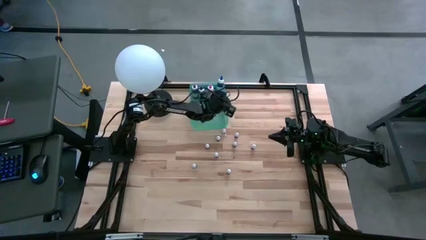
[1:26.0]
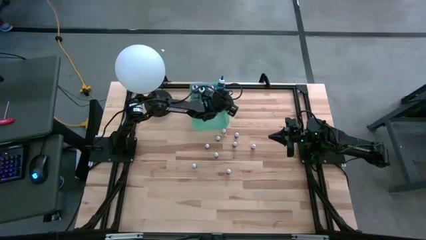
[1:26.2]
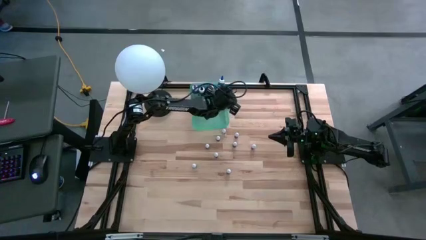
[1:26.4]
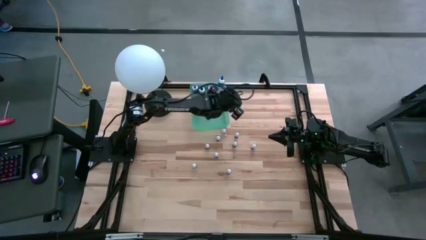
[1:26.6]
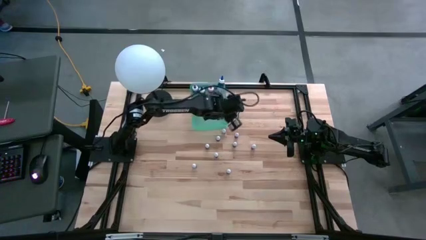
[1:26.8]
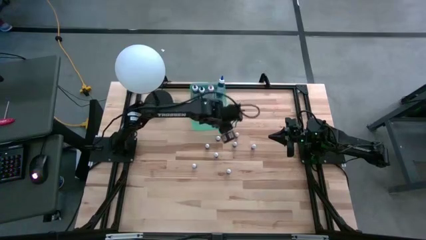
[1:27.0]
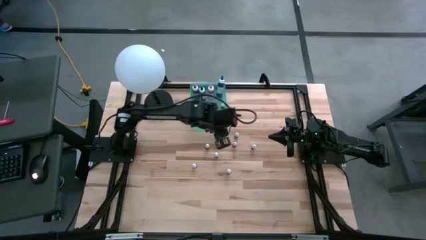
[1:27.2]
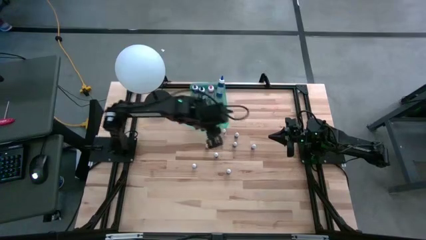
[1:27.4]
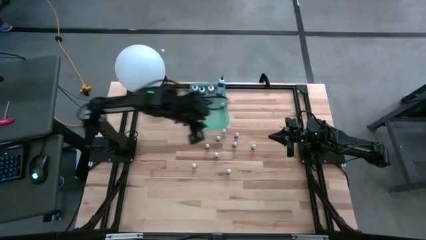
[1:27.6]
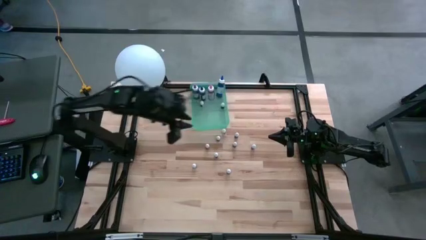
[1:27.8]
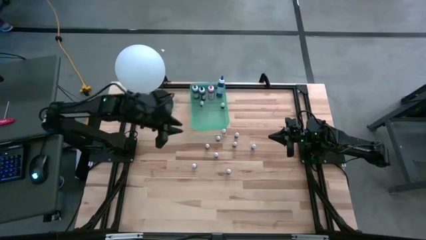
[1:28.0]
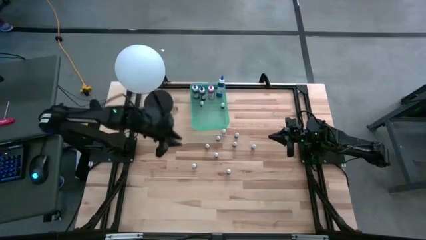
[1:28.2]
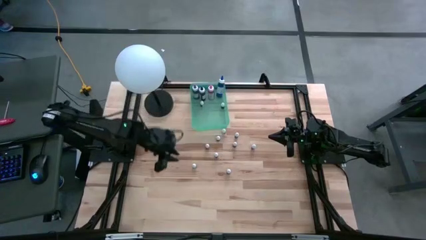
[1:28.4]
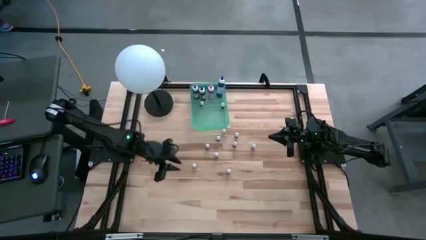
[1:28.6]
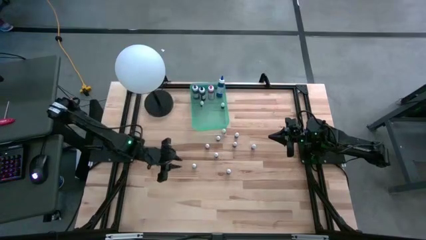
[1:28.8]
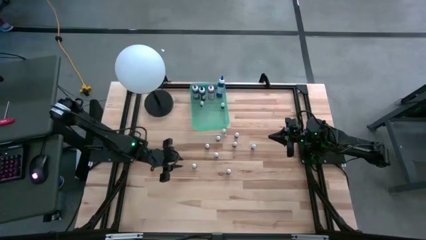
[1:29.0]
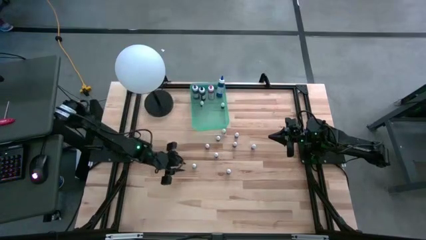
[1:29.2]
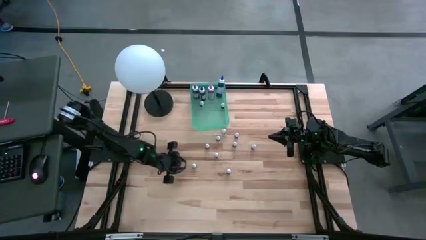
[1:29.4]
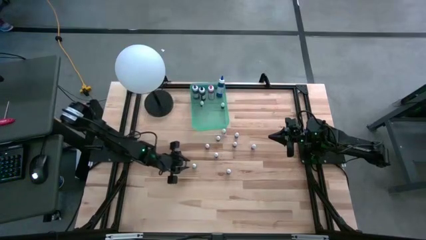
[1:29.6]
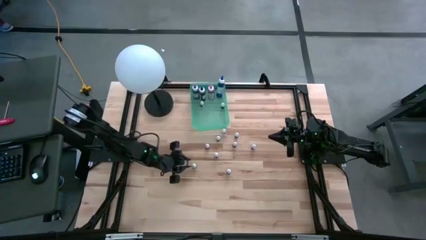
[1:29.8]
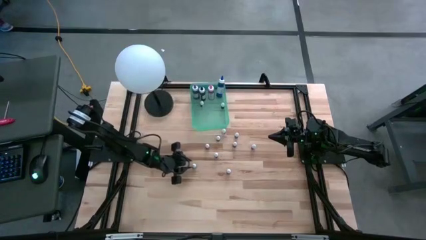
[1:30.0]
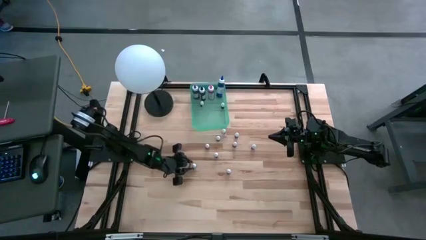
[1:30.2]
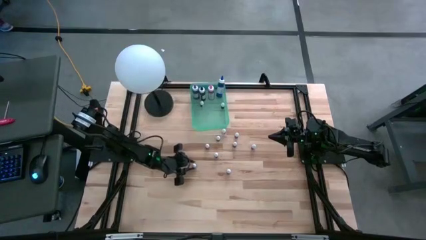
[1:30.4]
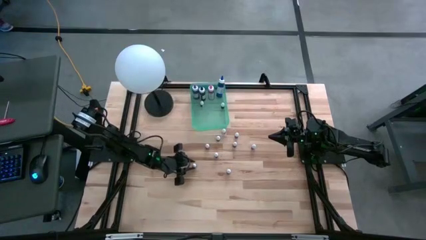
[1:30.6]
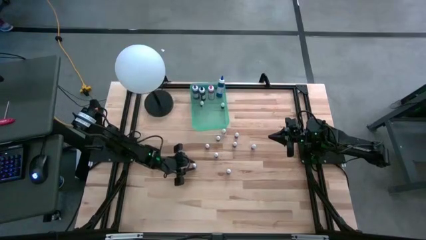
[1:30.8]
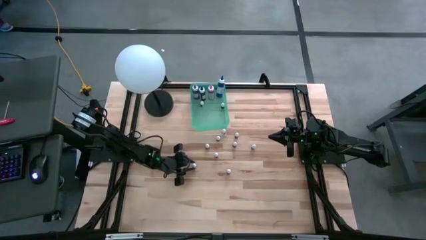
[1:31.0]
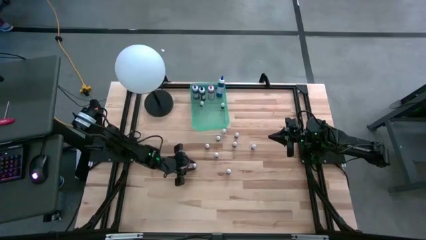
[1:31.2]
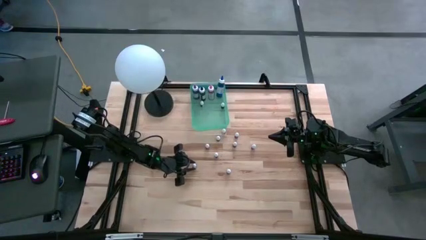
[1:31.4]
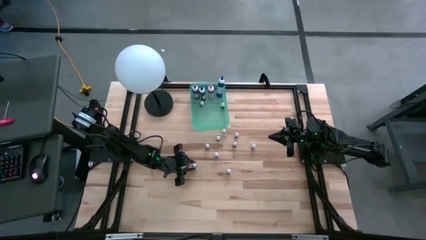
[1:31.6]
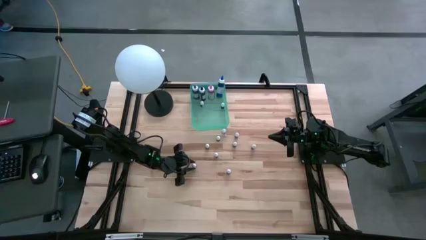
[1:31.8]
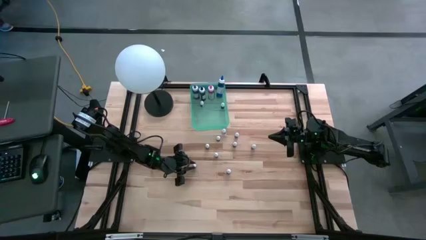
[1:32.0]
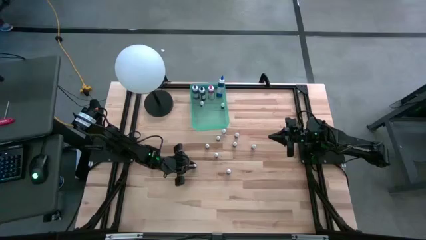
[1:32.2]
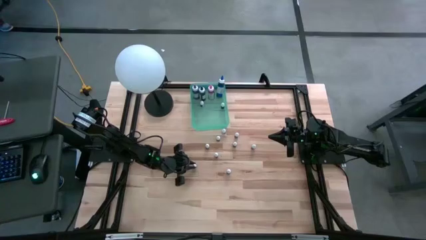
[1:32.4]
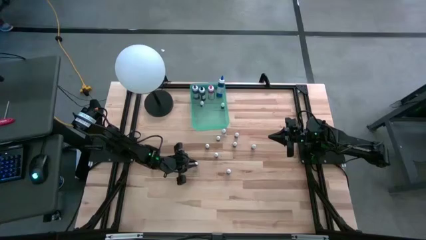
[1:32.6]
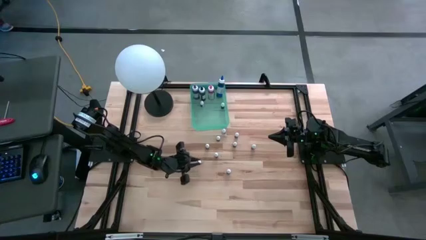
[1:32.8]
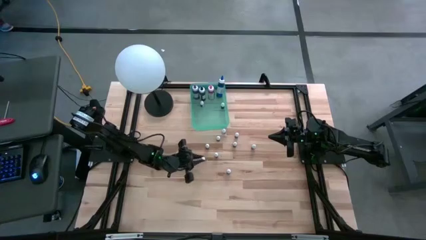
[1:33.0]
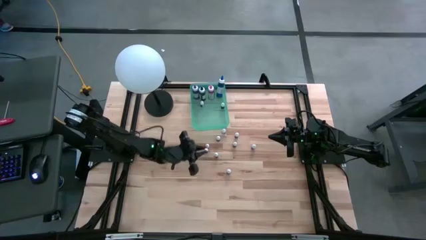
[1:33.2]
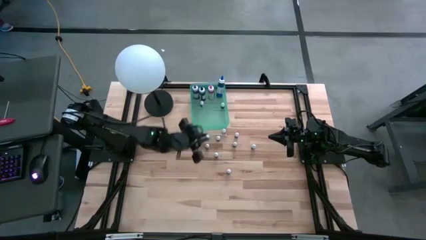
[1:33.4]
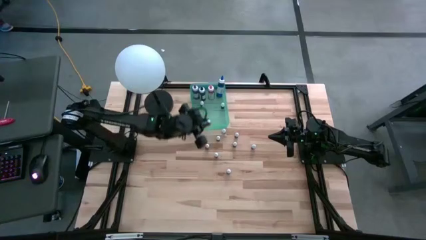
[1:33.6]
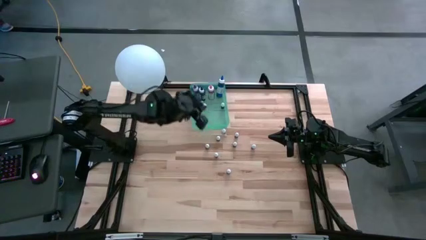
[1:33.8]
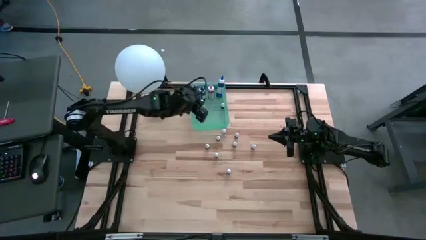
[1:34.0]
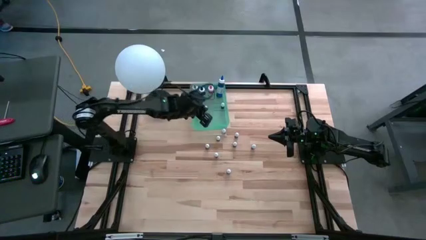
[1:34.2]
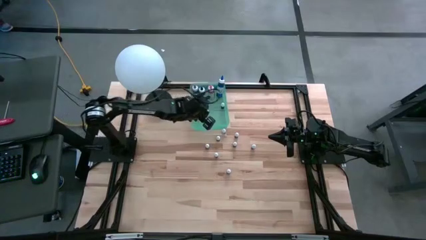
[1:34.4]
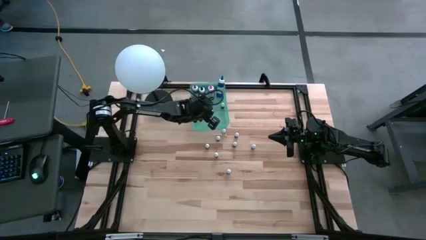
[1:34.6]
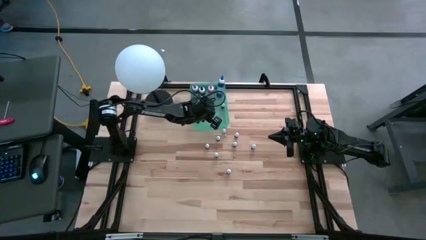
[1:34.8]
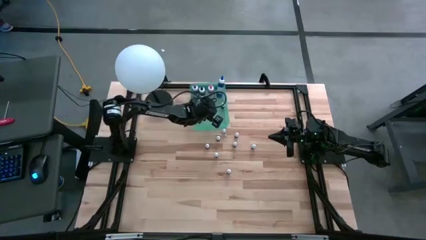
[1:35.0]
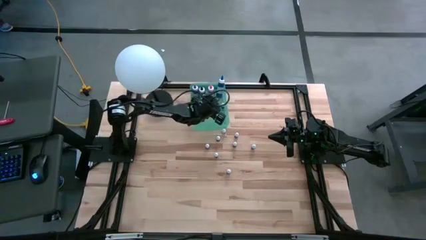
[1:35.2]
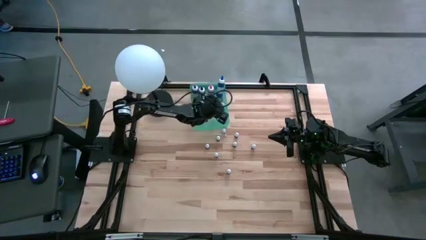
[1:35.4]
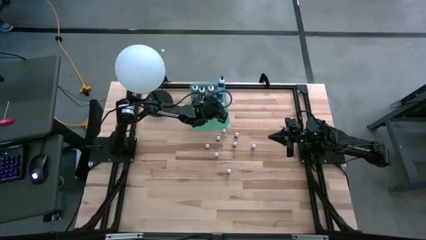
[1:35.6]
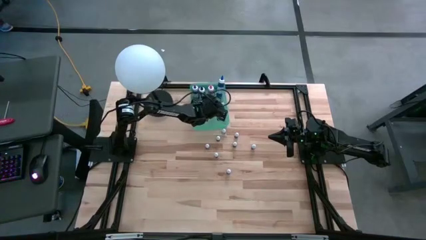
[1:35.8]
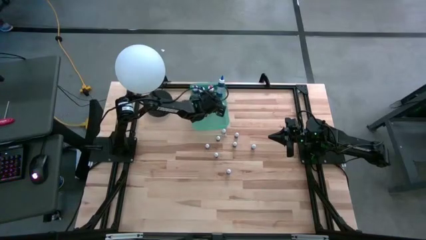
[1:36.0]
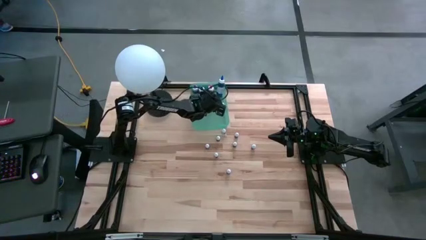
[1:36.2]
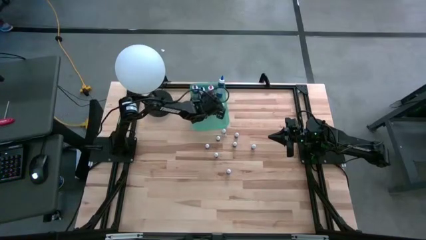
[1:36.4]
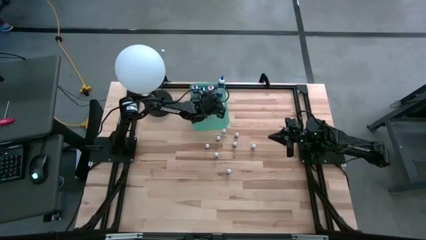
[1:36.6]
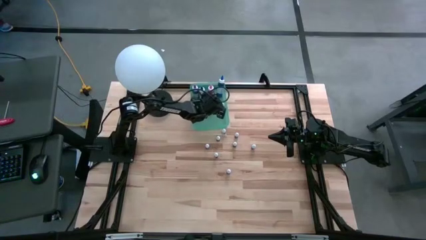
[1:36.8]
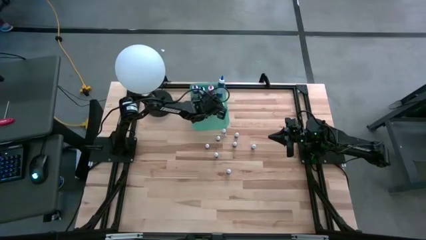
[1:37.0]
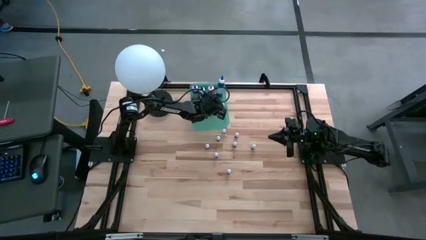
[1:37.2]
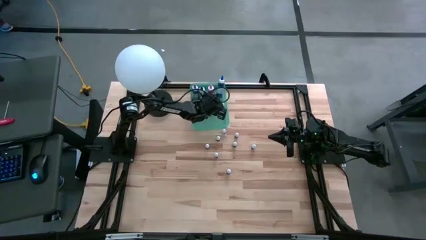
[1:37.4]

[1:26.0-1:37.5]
Task: Pick & Place food coloring
Put the small green food coloring bottle into the blue bin

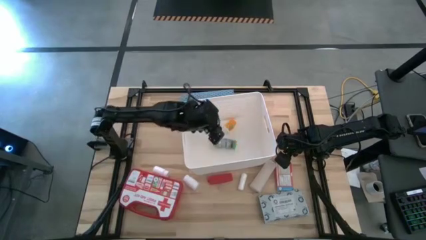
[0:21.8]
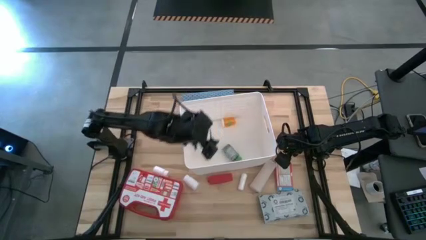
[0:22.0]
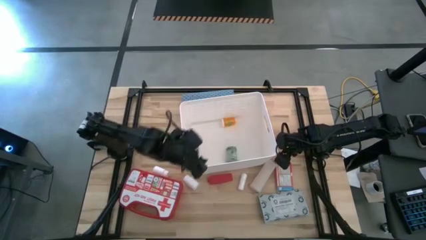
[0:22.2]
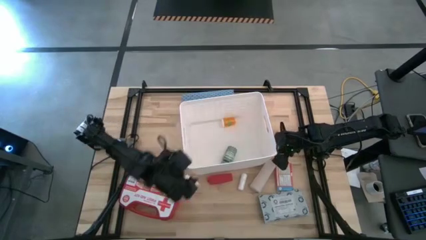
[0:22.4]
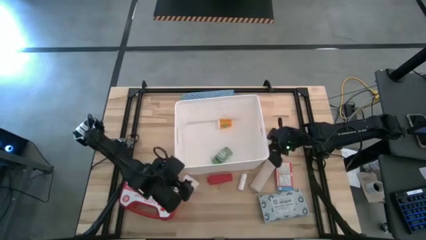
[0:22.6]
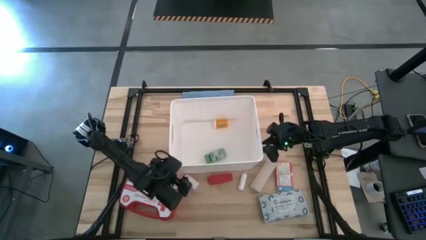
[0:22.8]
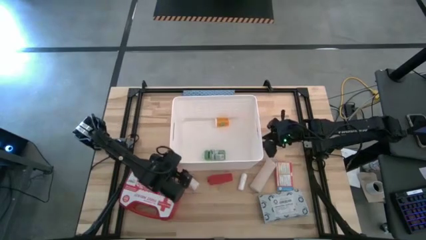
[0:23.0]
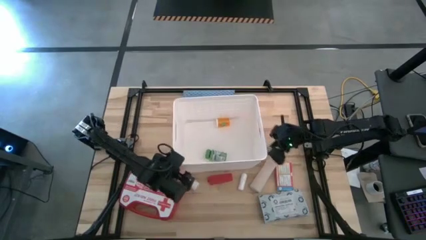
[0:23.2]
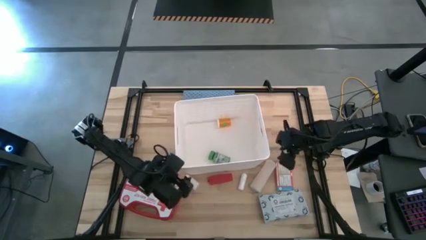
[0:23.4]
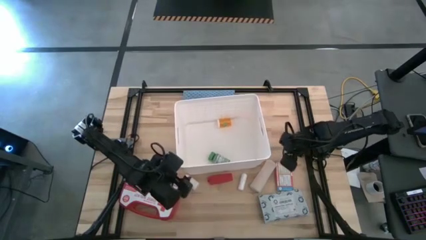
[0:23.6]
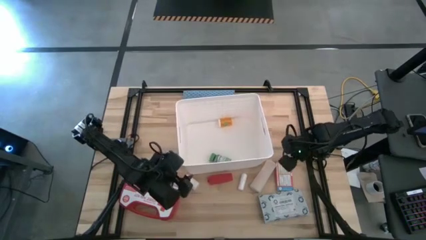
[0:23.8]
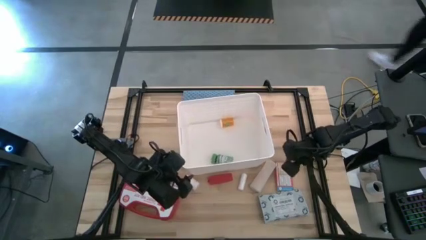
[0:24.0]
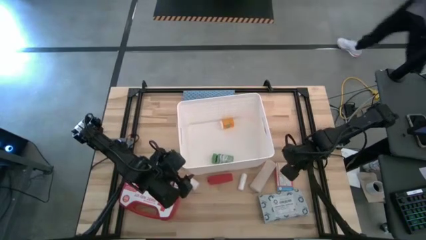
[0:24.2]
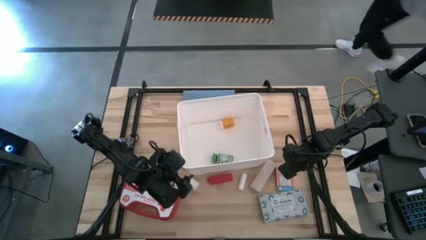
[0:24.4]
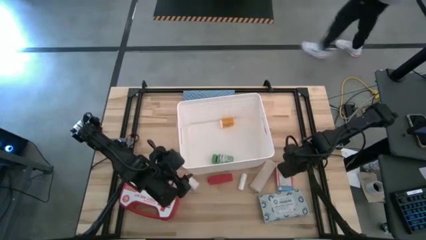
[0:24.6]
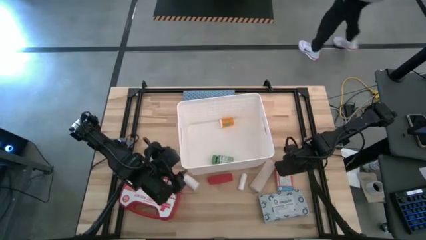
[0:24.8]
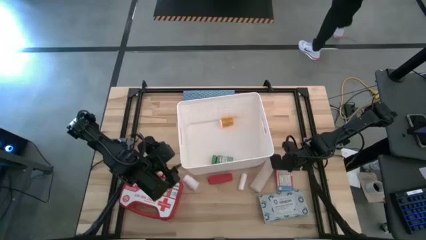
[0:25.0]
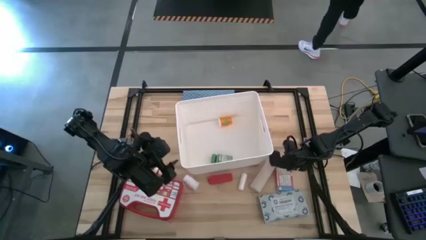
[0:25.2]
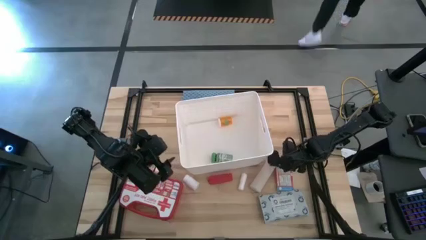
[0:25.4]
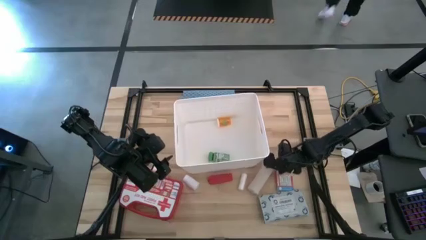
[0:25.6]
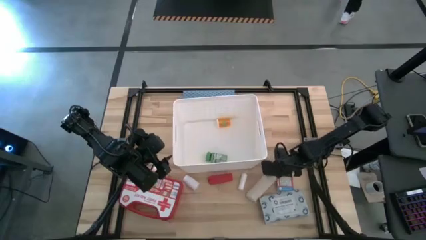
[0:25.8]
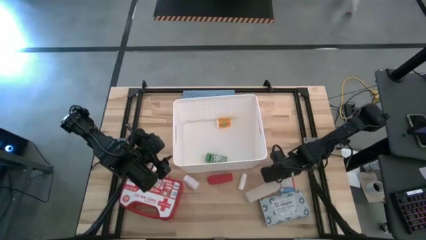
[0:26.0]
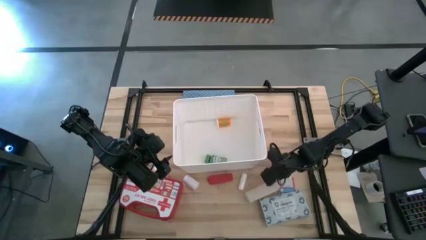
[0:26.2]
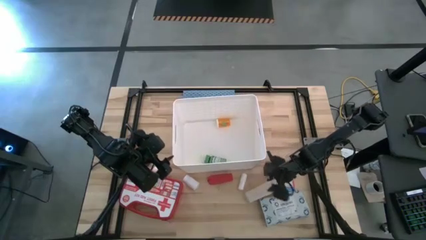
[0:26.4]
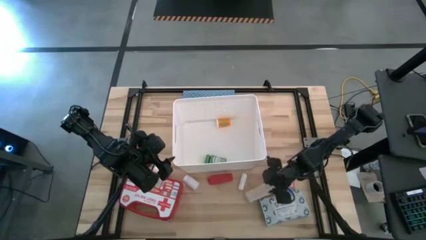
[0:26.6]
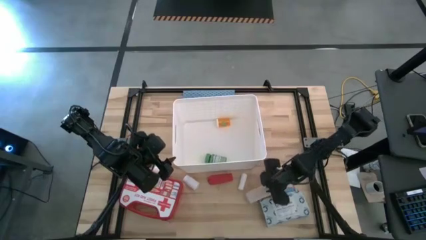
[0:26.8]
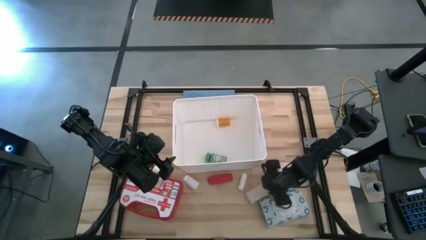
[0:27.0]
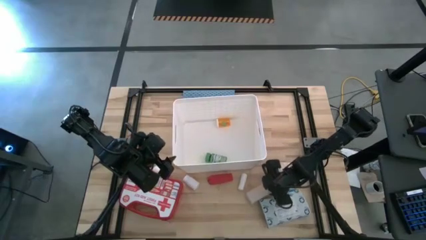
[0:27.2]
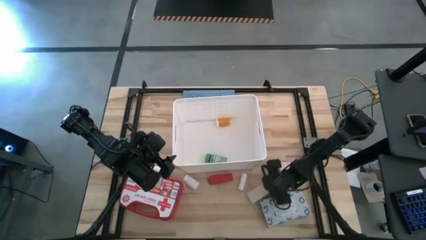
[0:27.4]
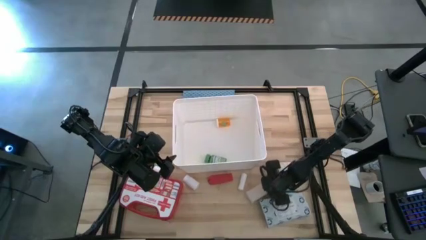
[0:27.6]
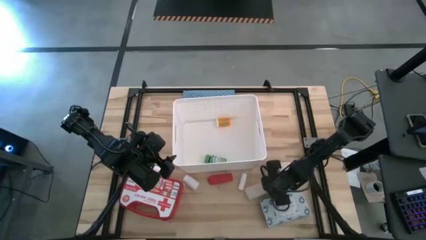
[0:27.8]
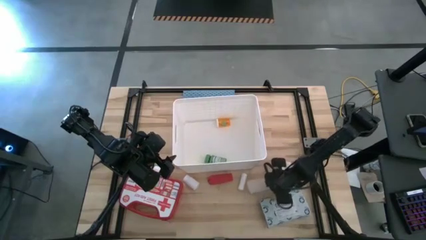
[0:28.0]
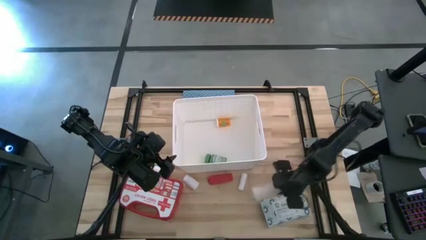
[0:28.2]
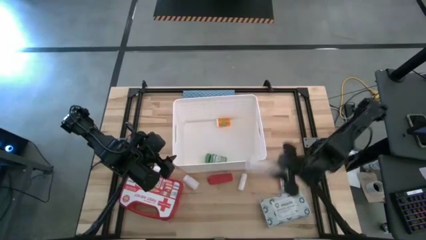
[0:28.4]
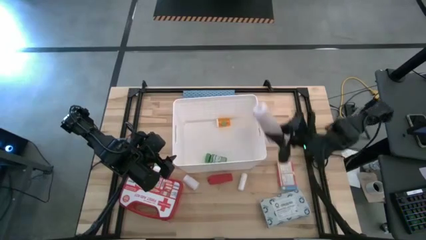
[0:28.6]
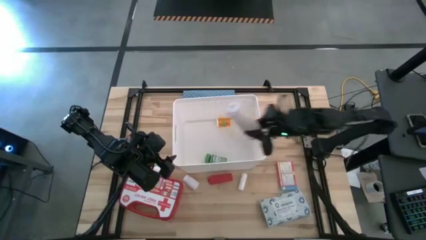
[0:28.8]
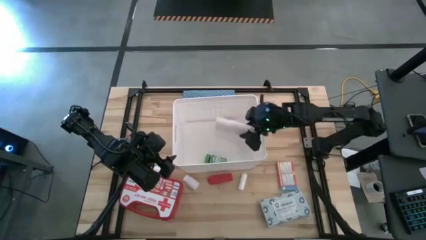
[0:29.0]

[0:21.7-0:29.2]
Task: Pick & place medical supplies in basket/bin
Put the brown bandage into the white basket
